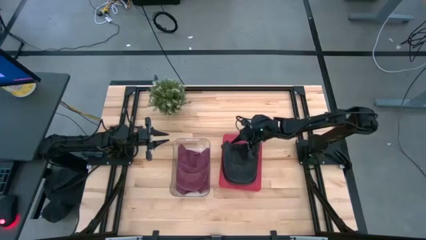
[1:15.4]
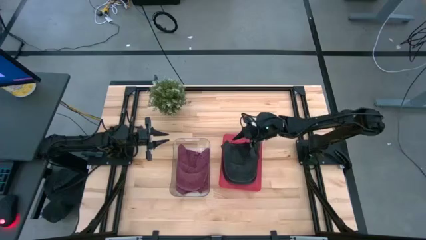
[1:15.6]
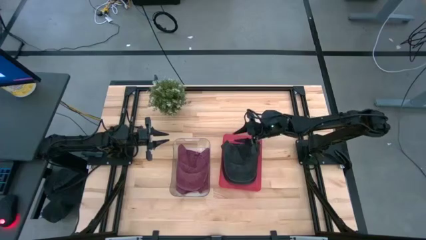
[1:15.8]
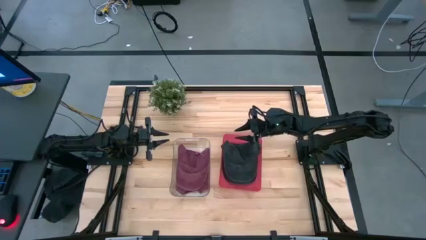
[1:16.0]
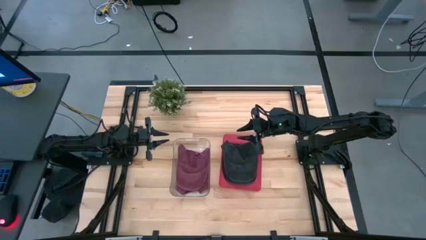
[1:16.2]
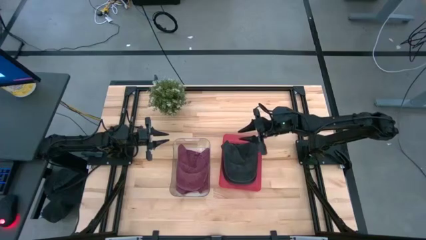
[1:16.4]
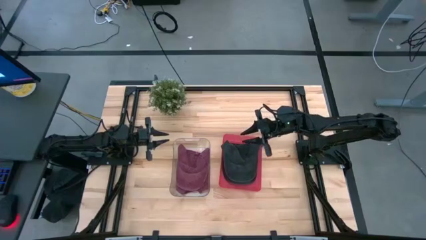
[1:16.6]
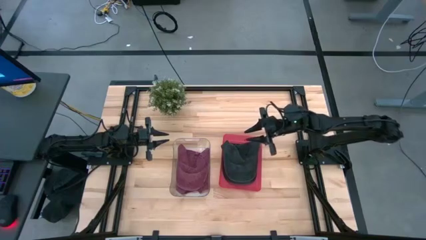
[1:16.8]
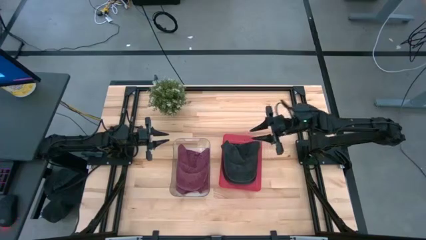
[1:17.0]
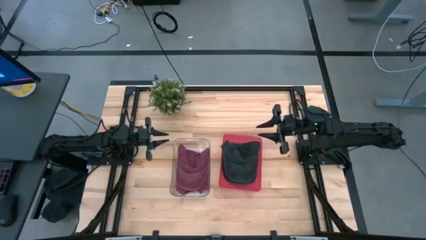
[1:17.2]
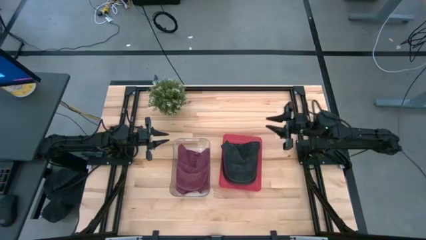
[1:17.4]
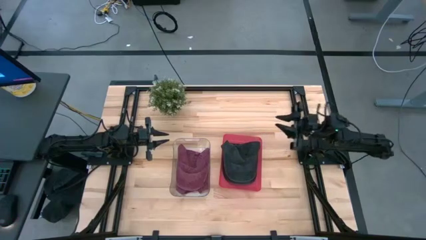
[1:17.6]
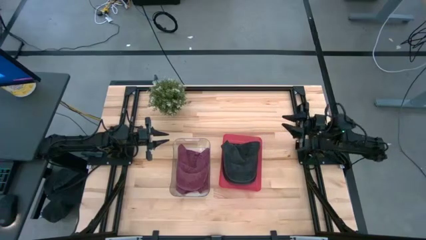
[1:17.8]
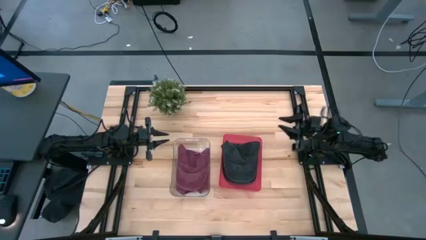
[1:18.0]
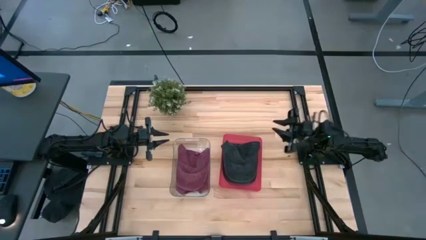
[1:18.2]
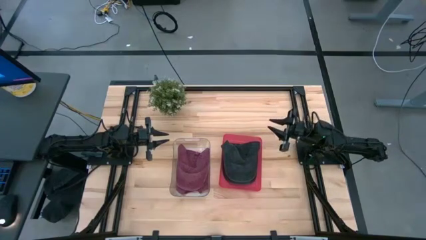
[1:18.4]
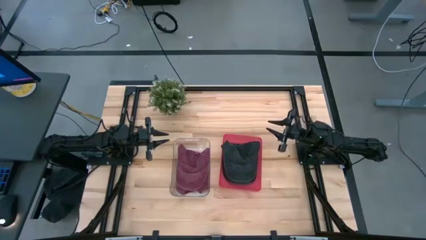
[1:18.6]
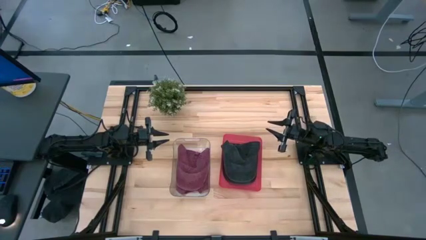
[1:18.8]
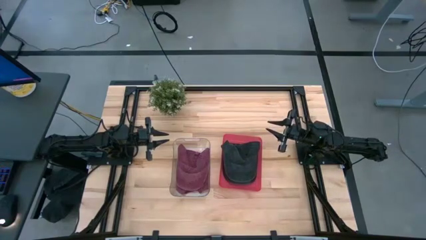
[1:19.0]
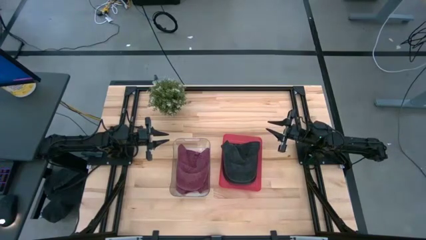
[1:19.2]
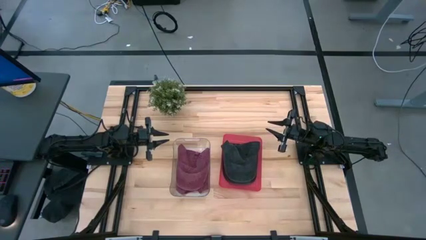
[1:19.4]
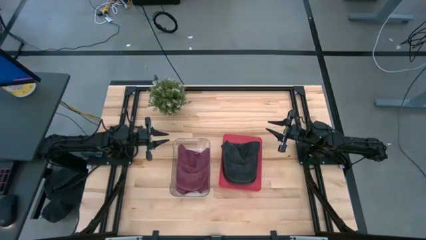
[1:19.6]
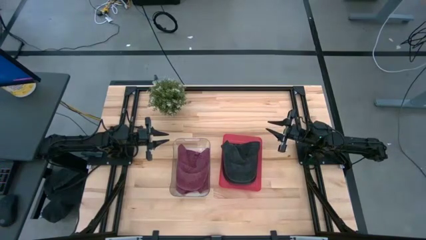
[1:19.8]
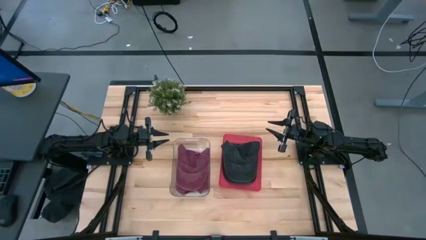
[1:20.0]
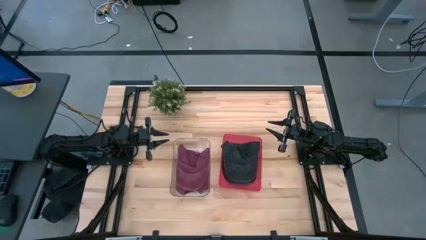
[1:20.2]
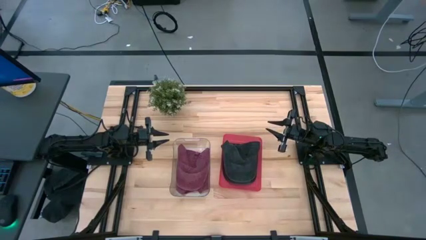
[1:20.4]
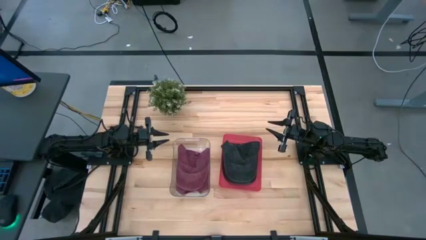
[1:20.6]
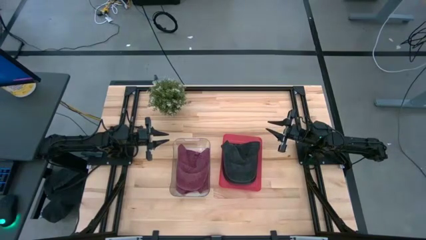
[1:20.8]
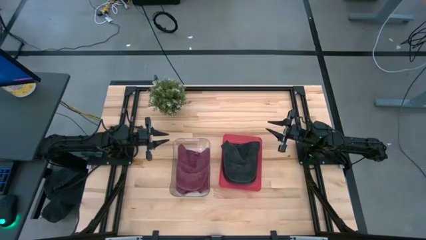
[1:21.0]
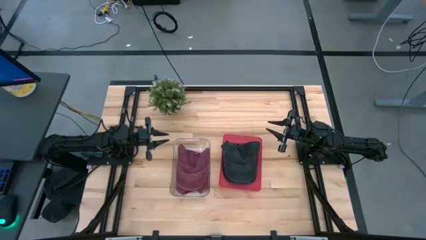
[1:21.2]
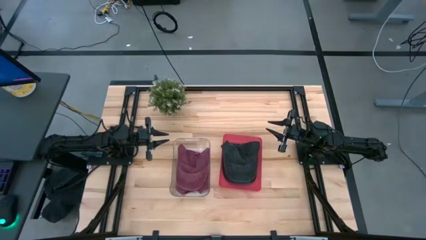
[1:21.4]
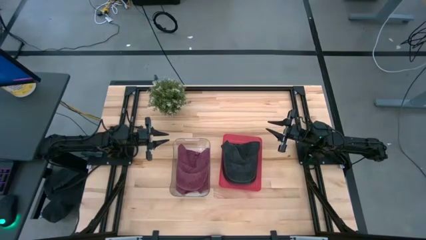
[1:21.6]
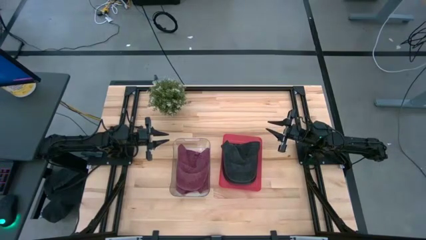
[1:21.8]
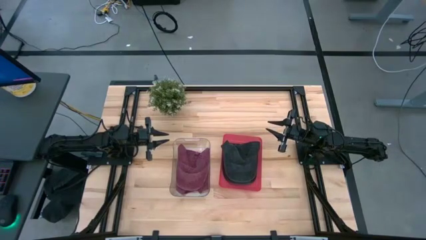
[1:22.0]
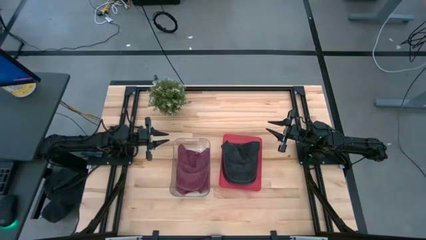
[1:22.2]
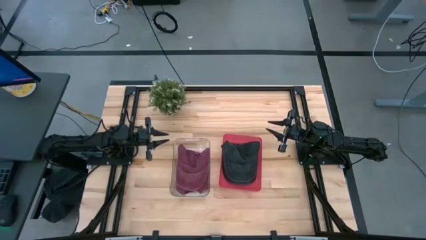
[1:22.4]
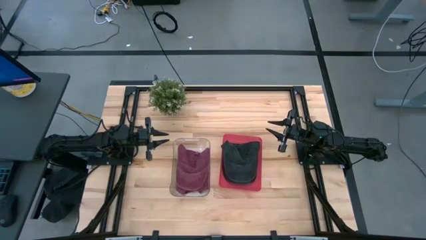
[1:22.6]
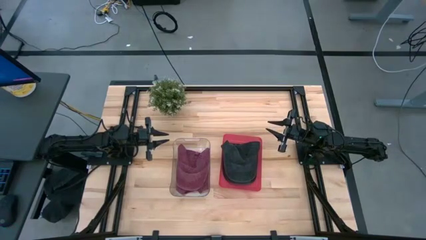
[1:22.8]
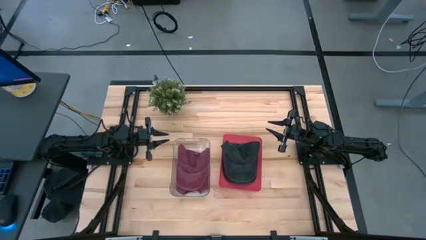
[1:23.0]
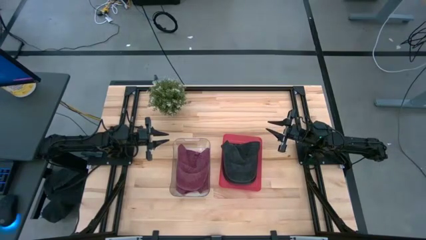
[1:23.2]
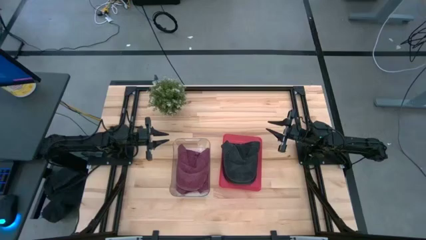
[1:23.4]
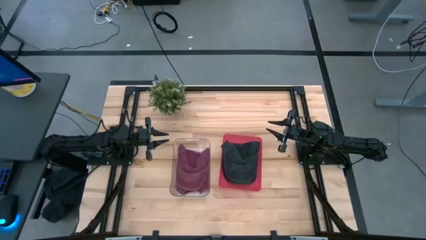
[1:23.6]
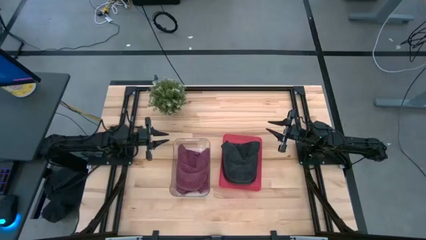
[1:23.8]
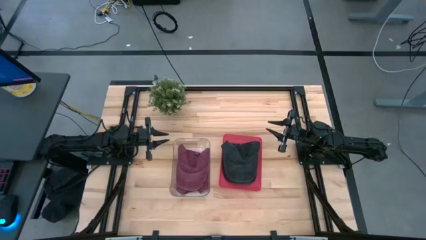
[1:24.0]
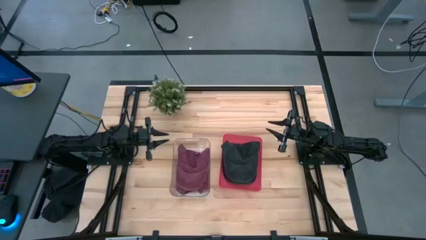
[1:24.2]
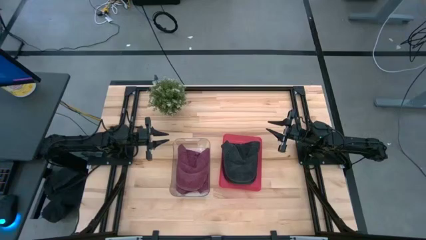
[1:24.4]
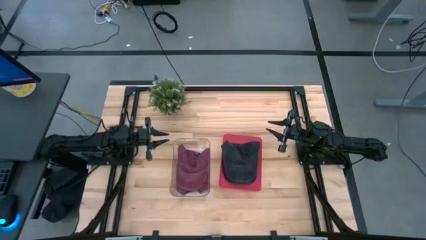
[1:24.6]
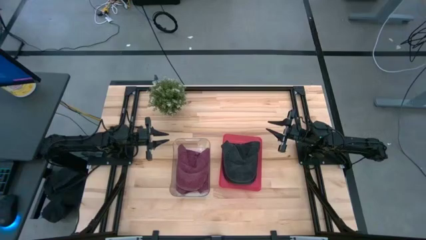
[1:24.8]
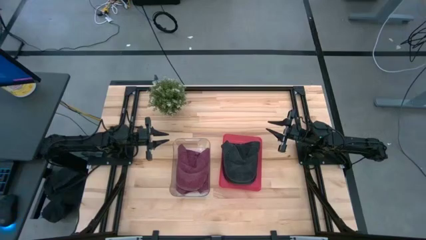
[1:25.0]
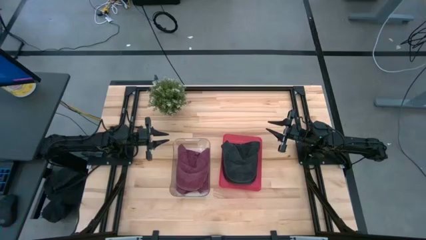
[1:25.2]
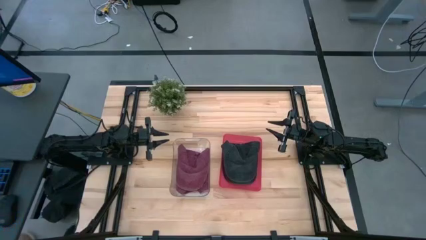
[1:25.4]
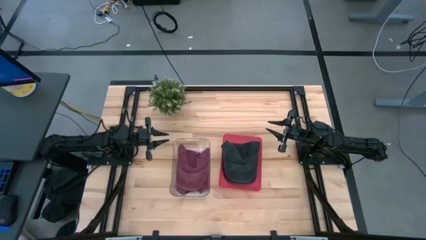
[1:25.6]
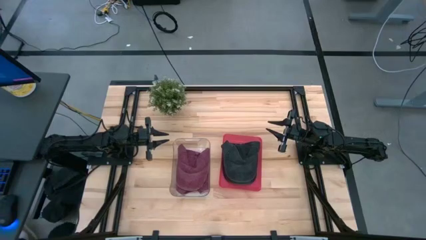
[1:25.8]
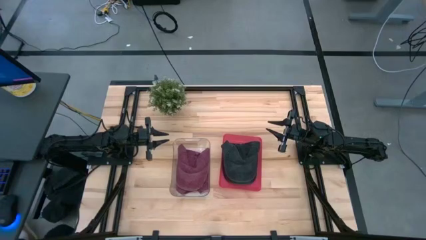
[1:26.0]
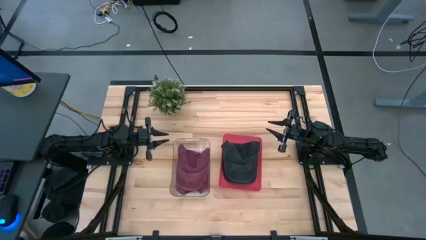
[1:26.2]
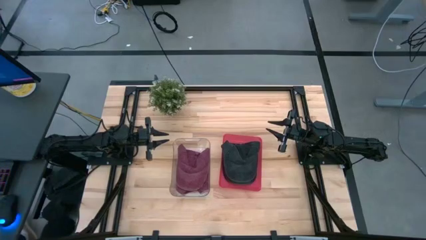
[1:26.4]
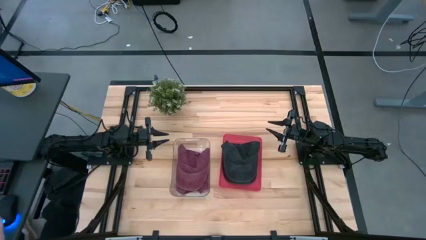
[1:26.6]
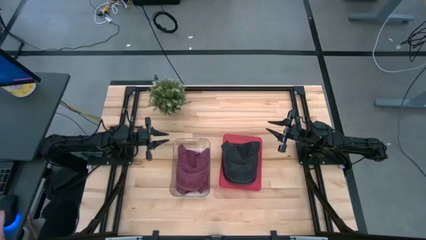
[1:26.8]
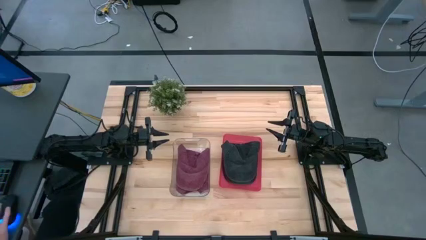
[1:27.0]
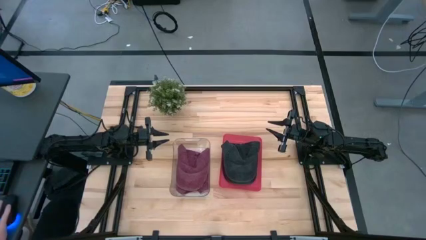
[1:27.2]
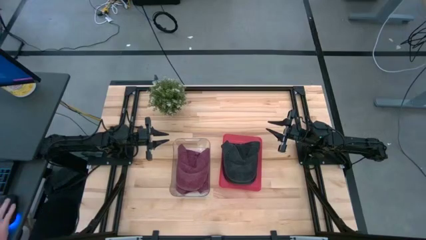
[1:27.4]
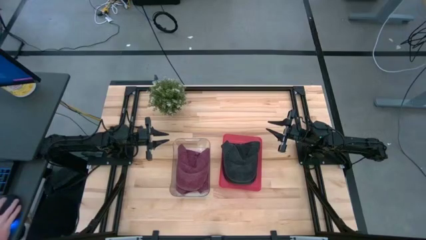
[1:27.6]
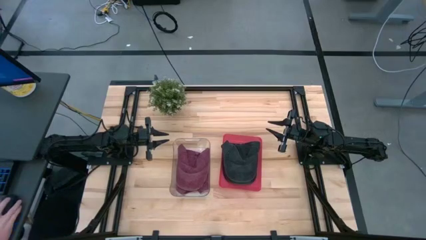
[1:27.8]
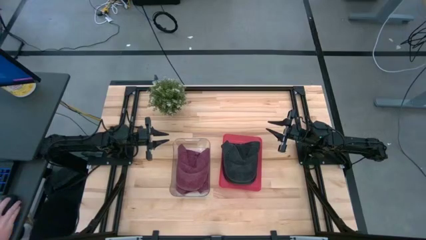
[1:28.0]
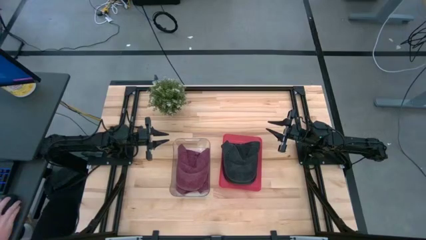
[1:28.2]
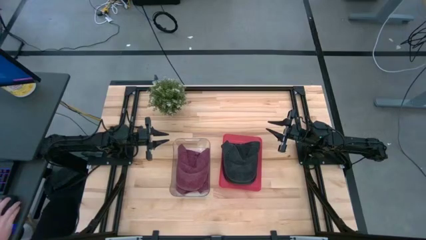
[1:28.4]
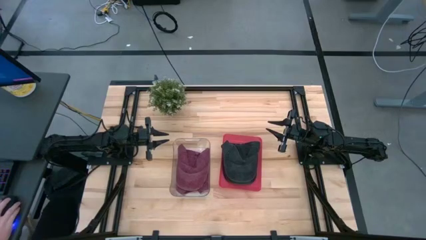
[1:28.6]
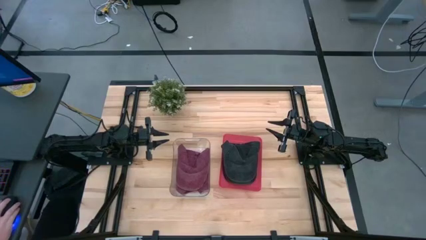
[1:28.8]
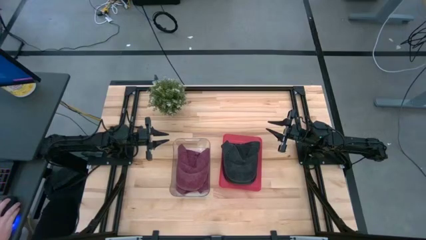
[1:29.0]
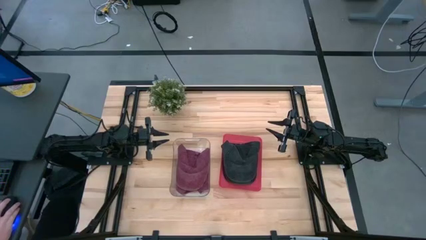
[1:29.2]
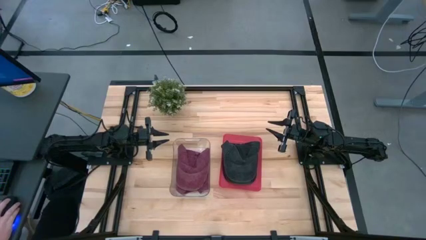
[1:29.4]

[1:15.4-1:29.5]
Task: Pick & Place hat
Return to Home Position
